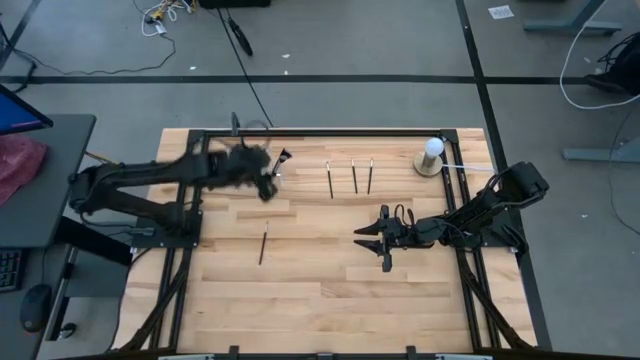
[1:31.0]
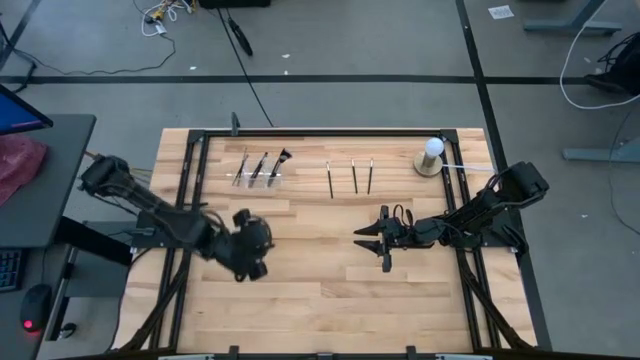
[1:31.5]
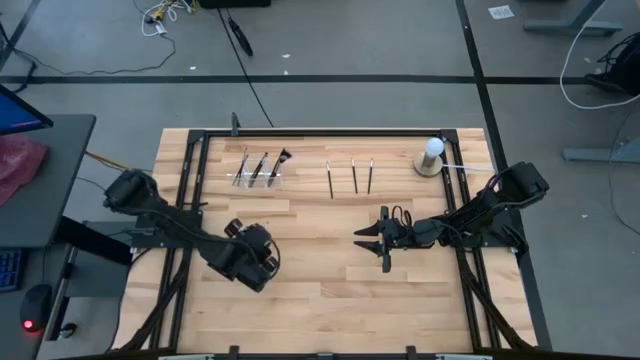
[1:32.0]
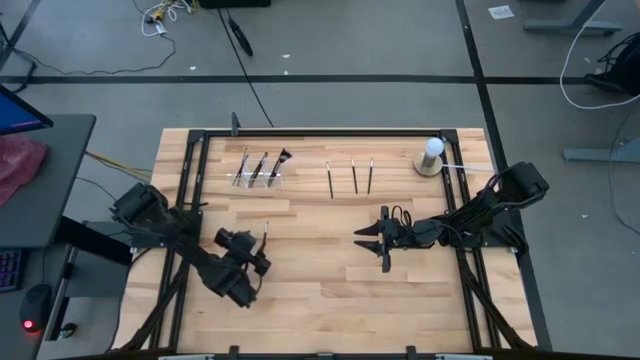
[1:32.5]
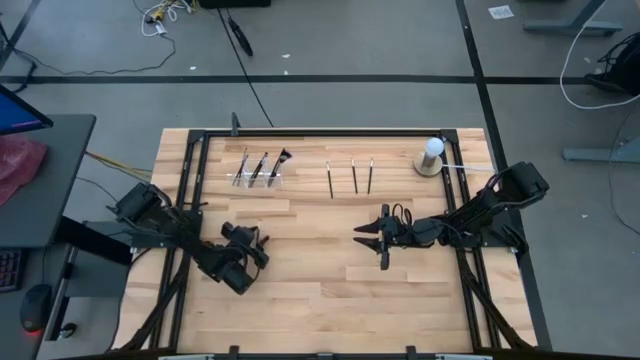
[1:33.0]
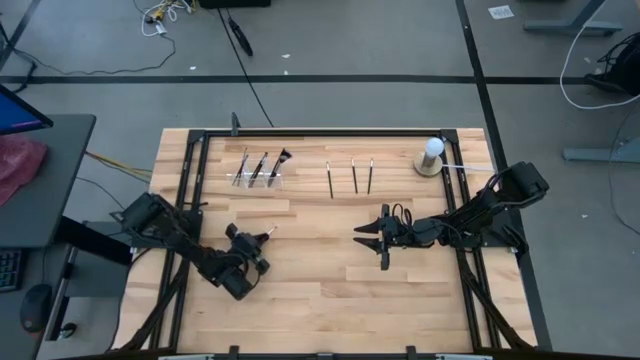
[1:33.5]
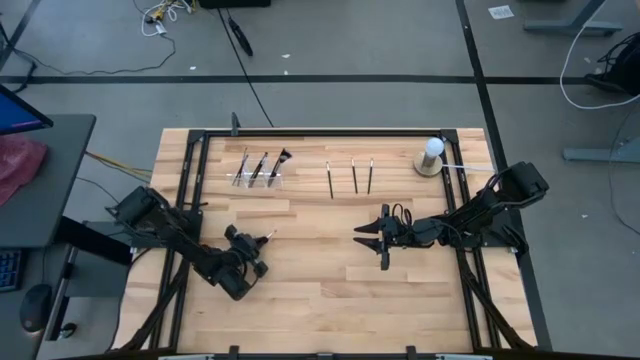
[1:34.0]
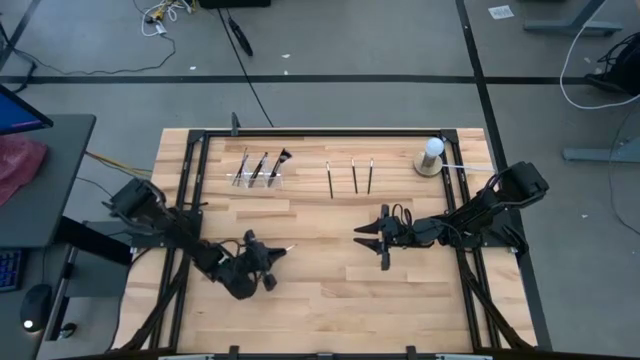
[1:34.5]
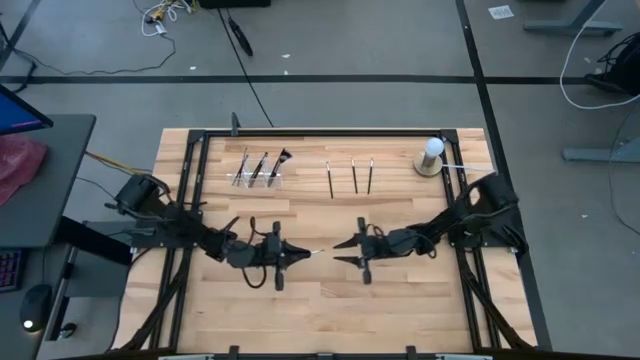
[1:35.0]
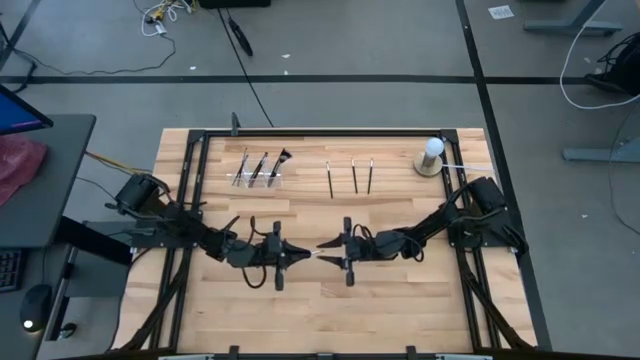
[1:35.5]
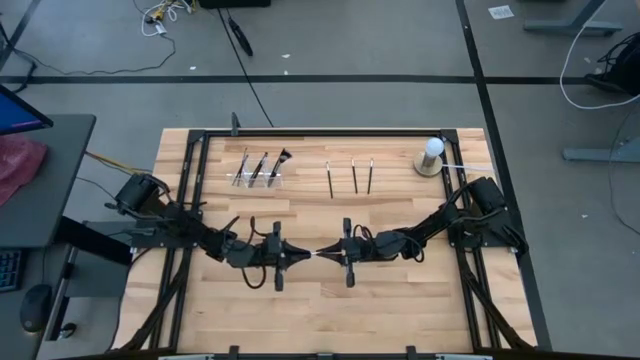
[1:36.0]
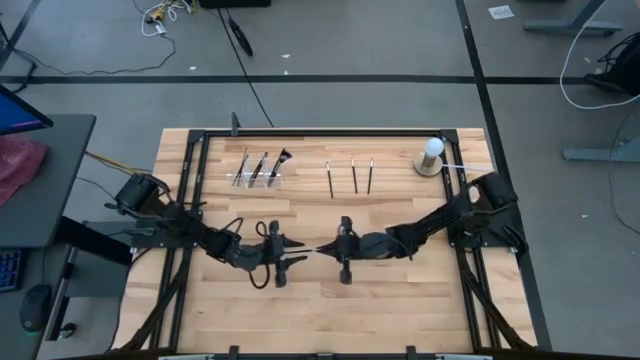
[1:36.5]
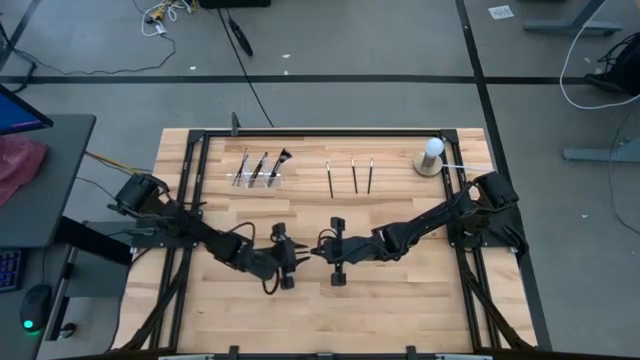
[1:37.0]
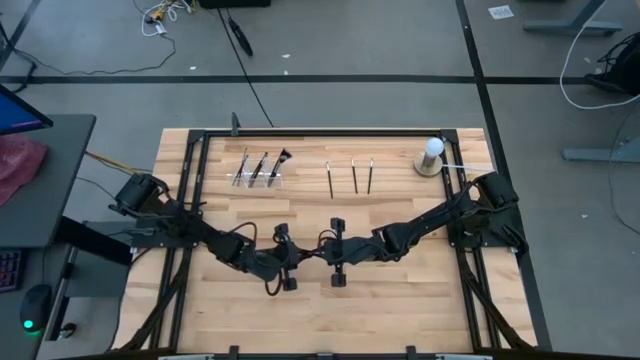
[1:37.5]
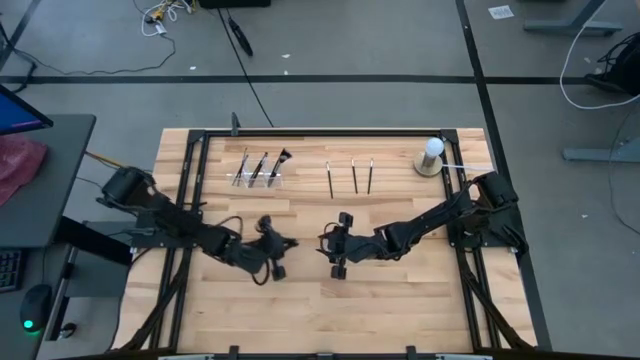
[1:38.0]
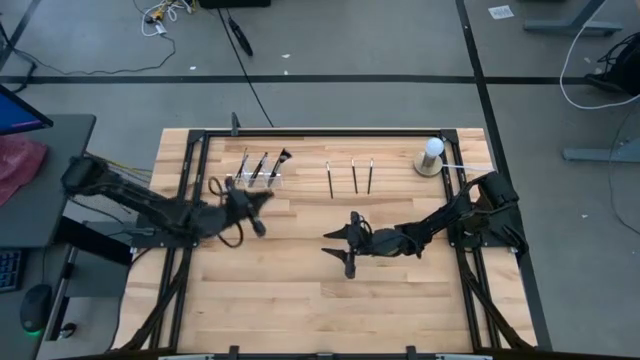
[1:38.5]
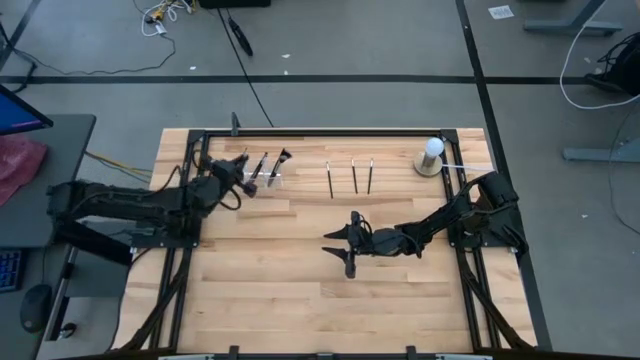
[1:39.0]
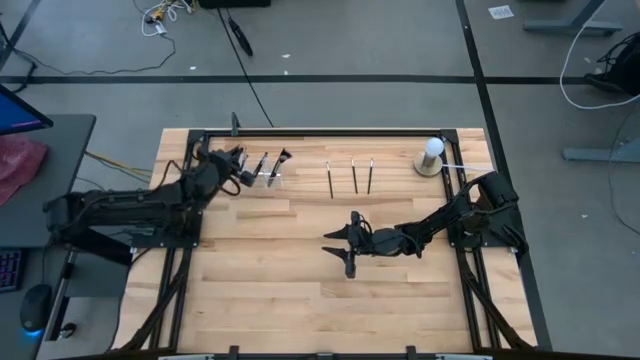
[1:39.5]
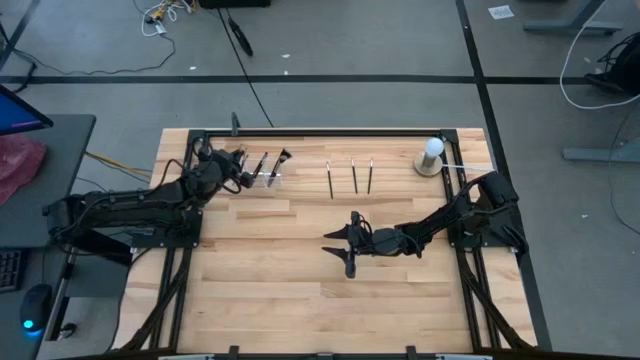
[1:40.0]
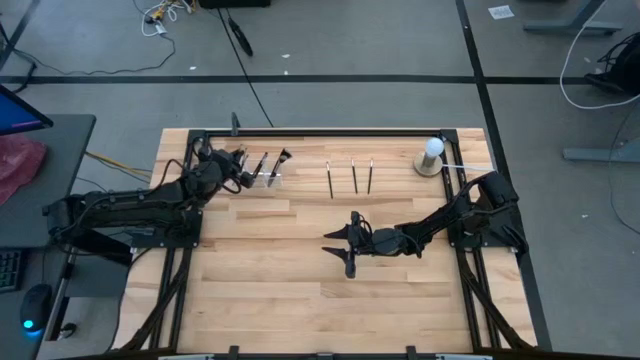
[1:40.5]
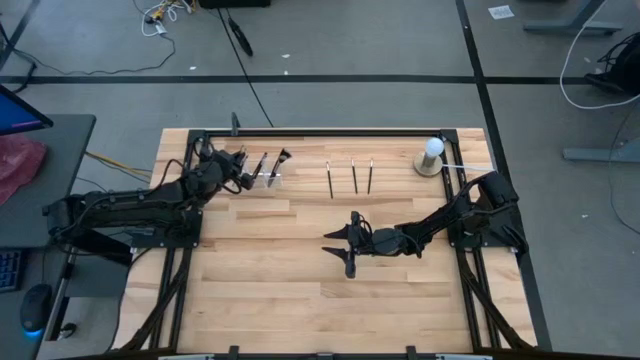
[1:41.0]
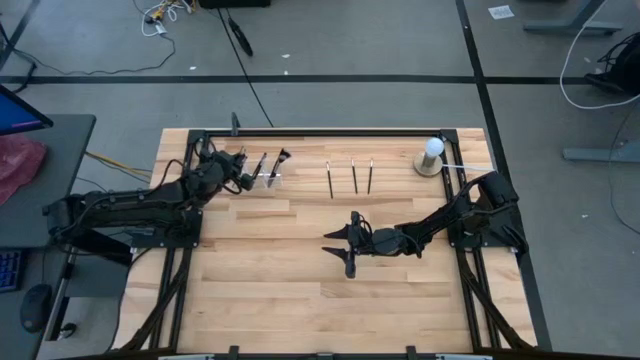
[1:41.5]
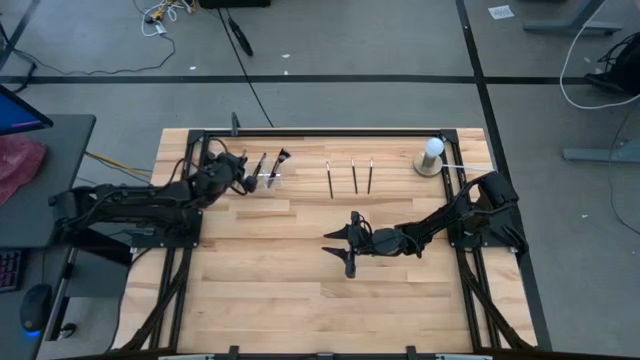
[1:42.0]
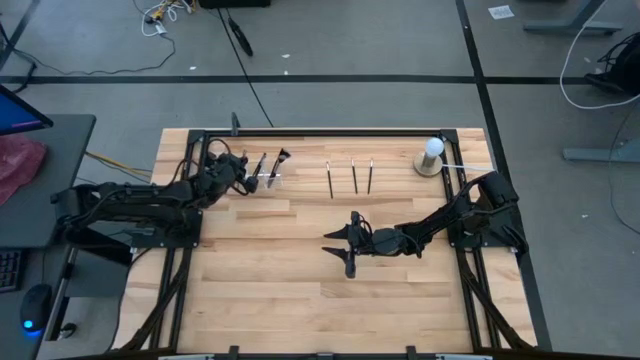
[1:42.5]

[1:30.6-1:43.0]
Task: Put items in baskets/containers
Put the eyeshadow brush into the transparent organizer

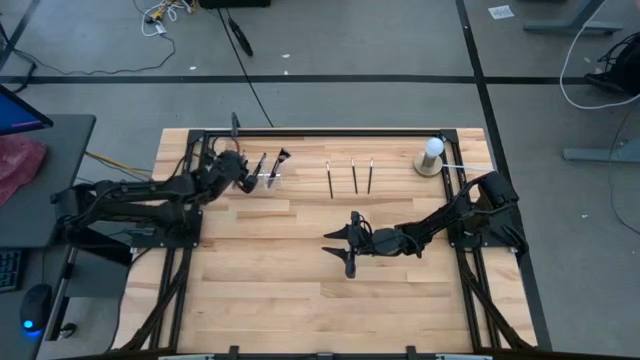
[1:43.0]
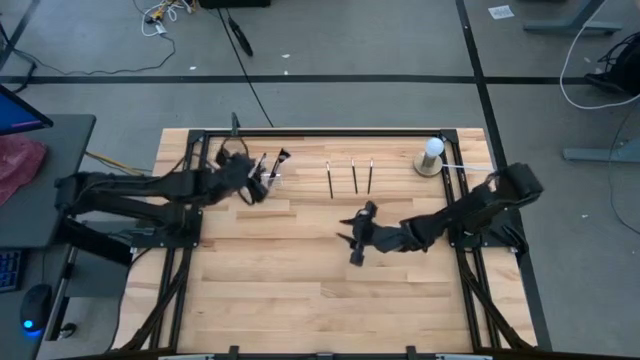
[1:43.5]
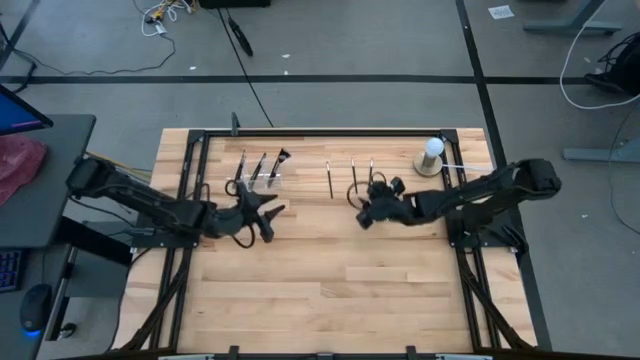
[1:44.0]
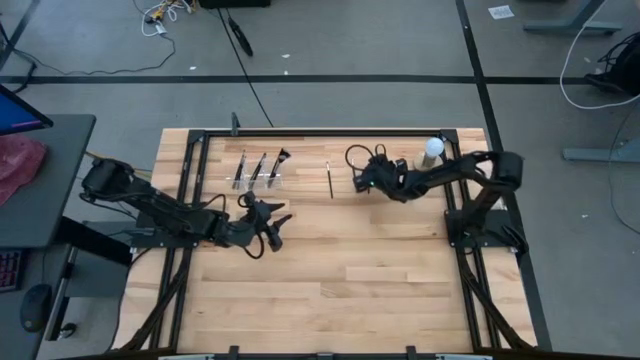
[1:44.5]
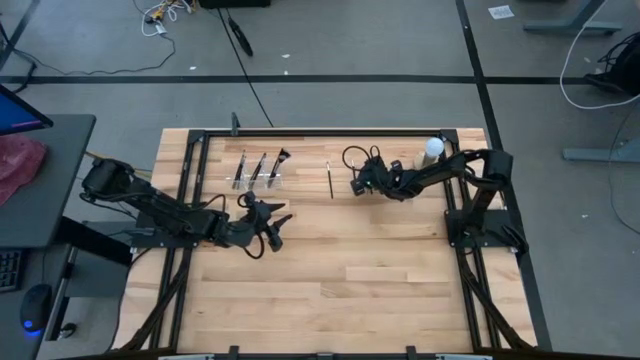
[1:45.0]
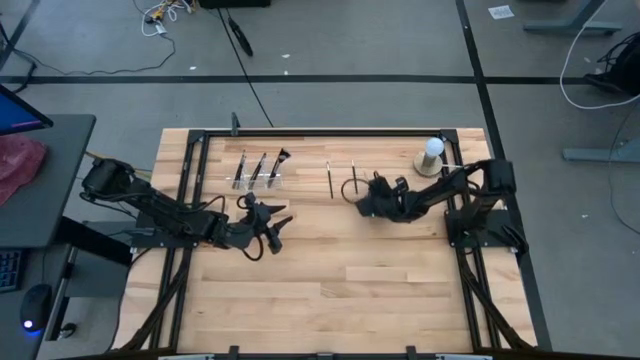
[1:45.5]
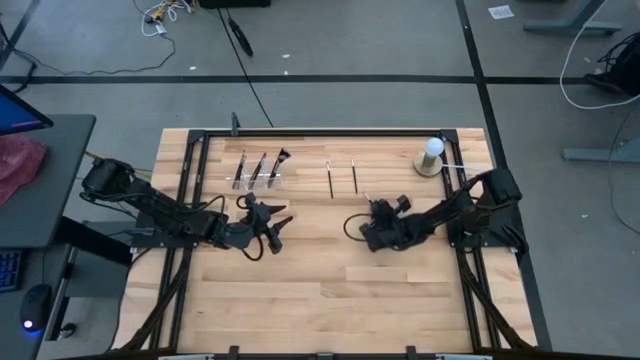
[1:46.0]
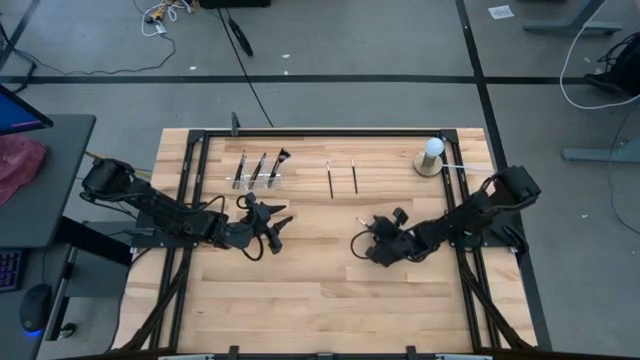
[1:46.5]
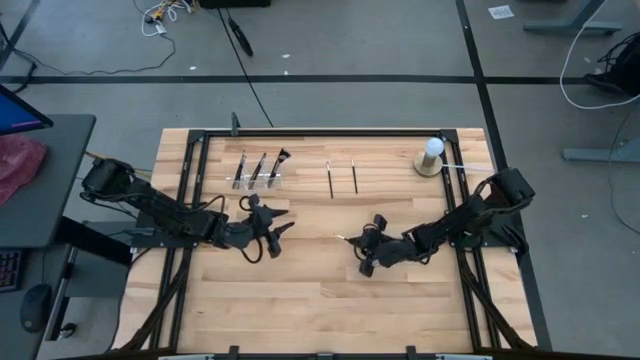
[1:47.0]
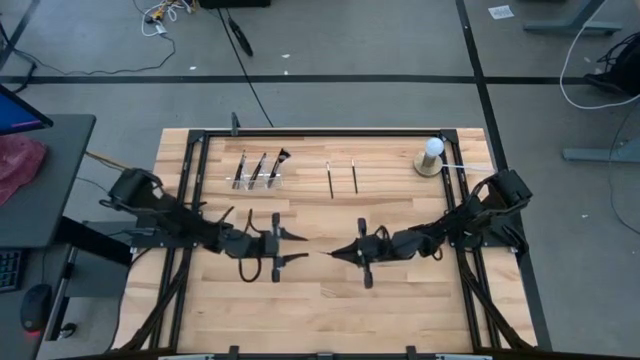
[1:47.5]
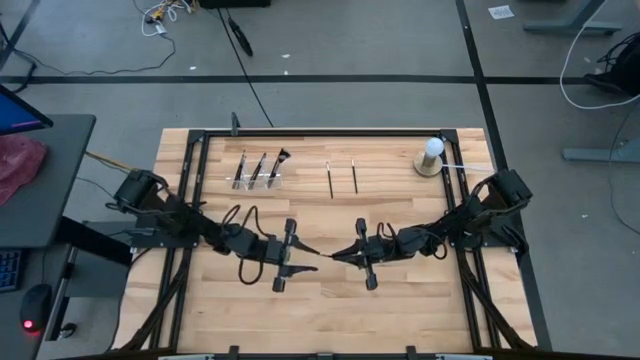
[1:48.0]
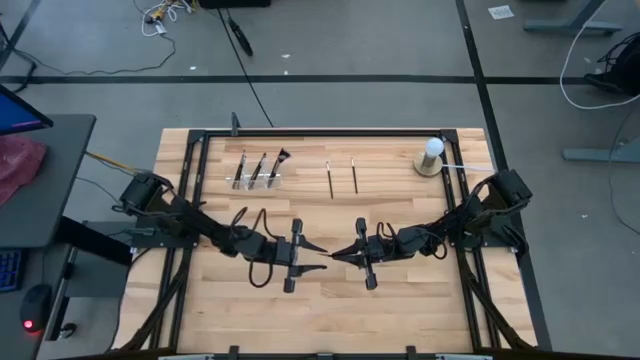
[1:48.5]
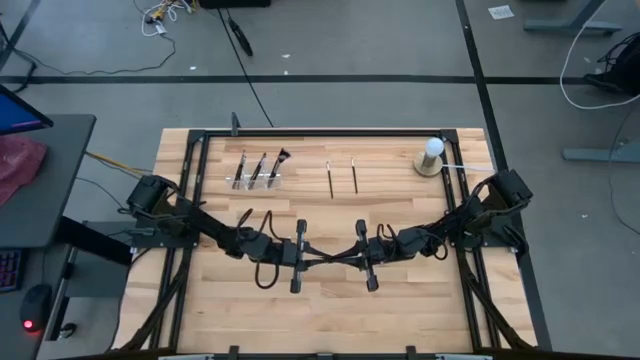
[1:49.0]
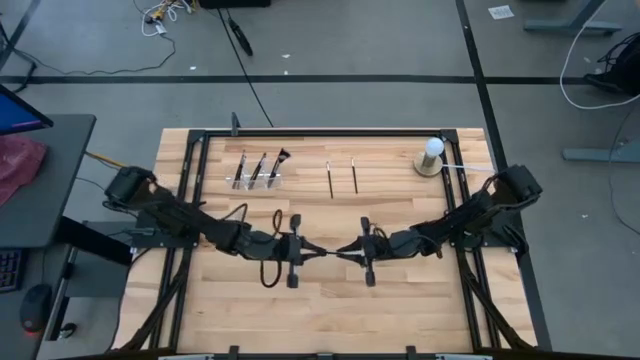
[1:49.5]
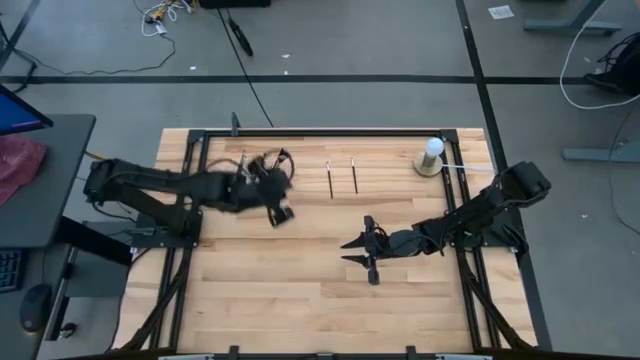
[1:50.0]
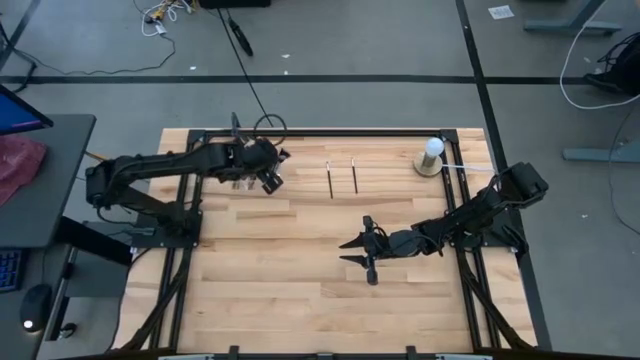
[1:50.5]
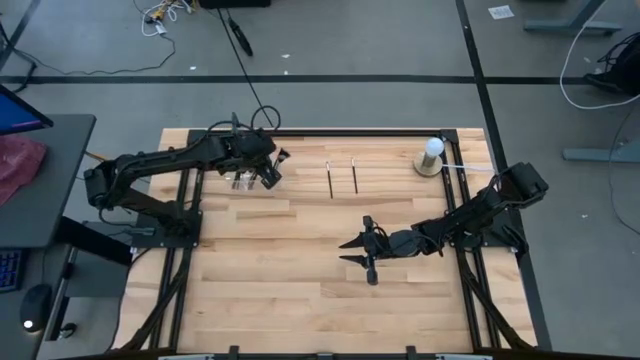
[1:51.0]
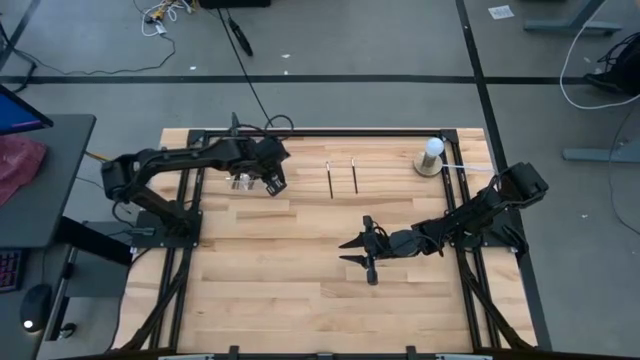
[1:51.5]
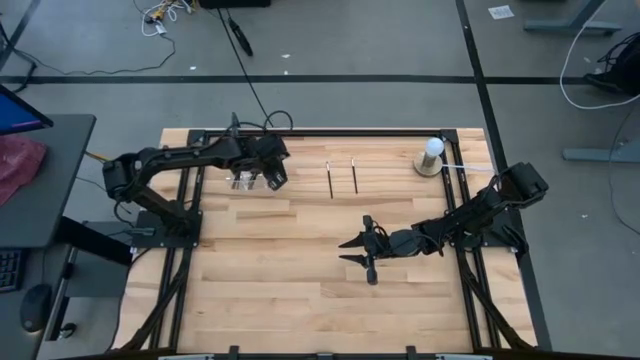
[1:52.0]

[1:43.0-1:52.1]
Put the eyeshadow brush into the transparent organizer

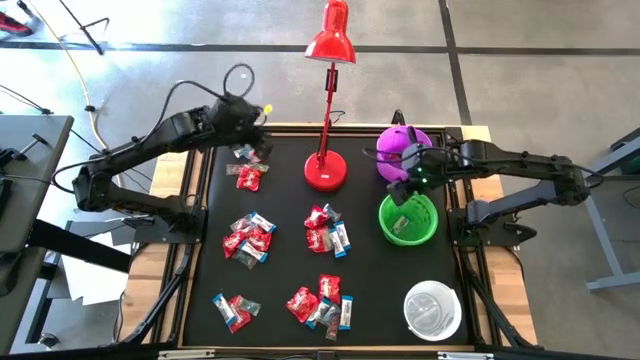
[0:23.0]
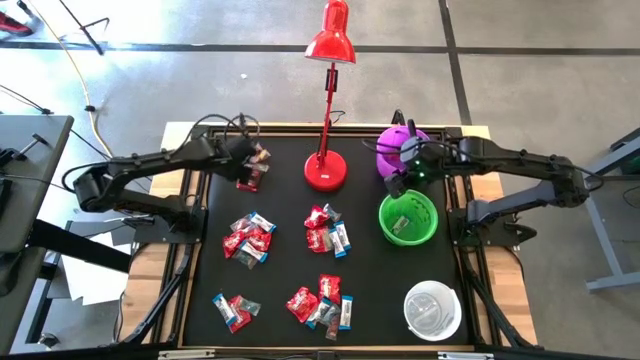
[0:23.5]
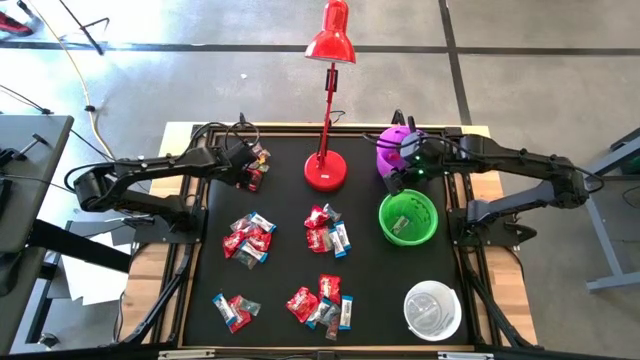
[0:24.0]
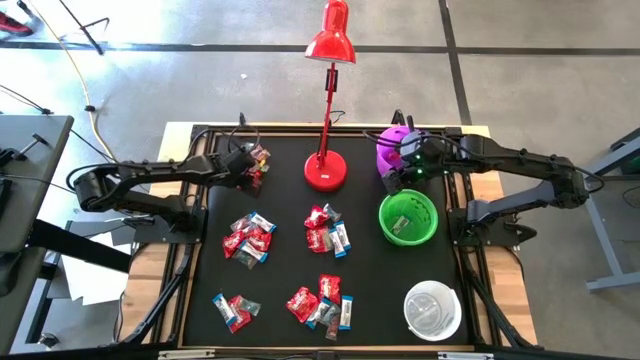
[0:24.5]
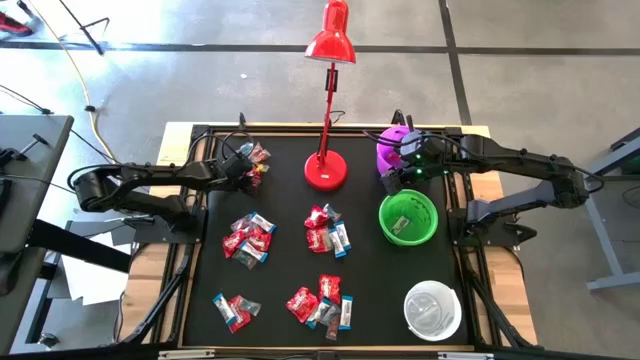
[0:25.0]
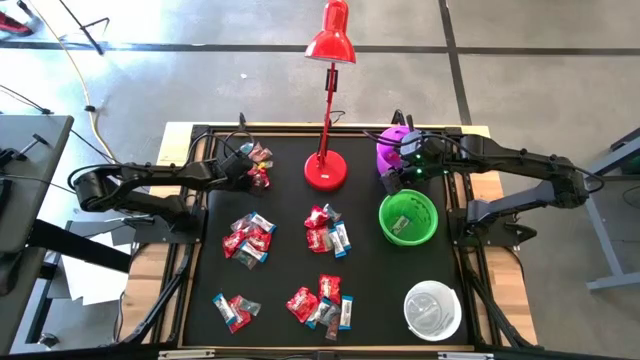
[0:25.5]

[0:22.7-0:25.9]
Task: Organize candy in baskets
Put the red candy into the white bucket
